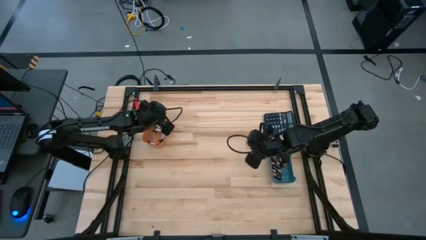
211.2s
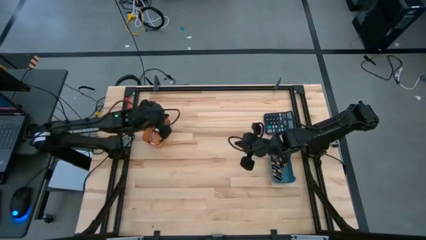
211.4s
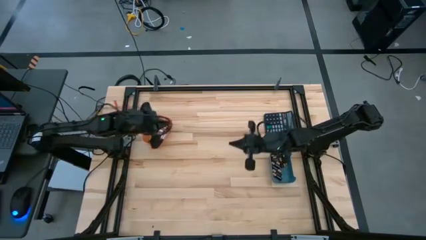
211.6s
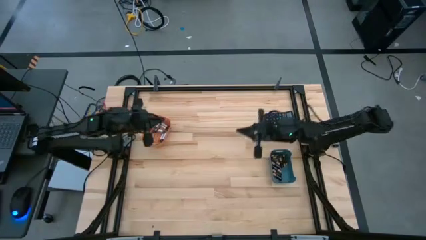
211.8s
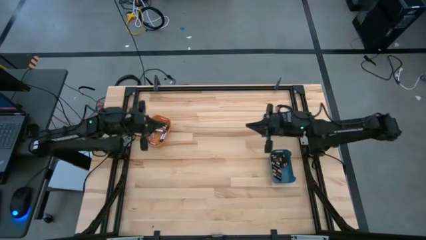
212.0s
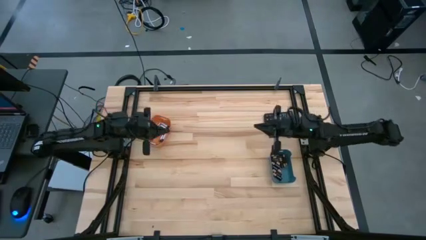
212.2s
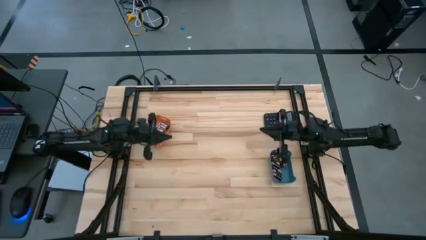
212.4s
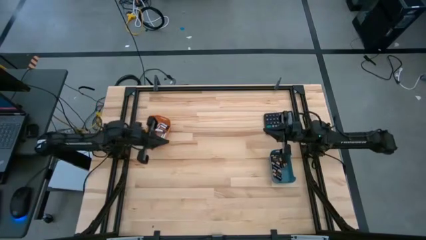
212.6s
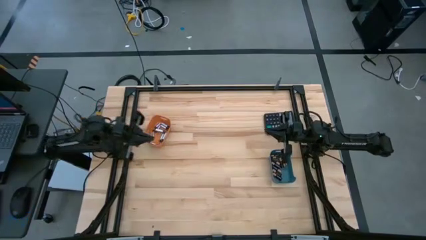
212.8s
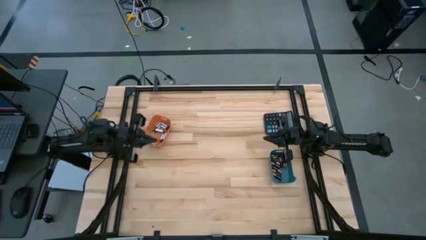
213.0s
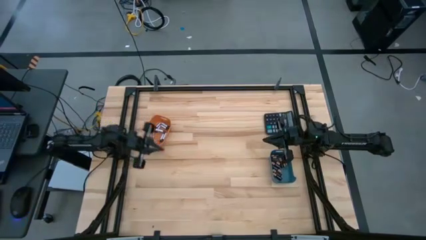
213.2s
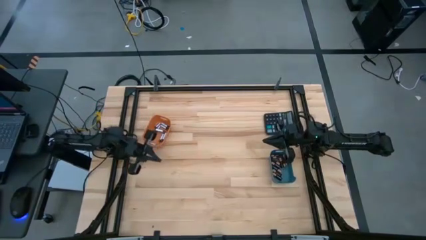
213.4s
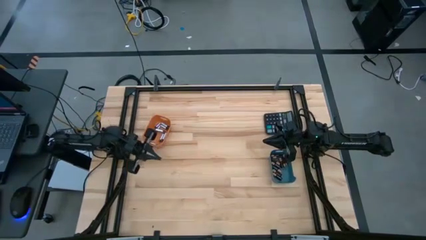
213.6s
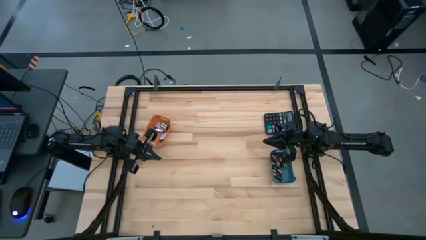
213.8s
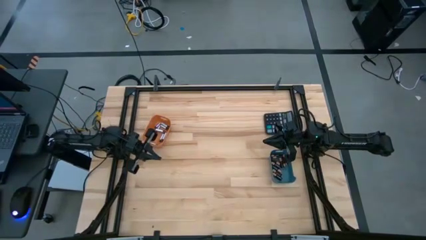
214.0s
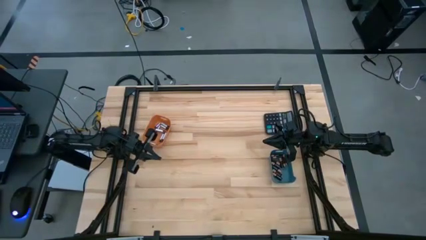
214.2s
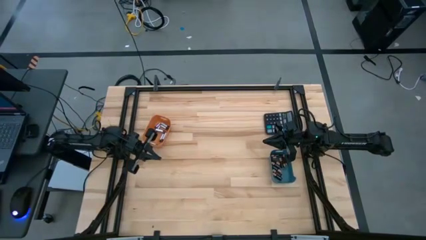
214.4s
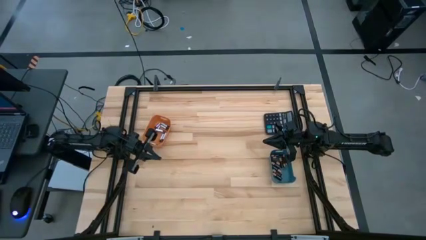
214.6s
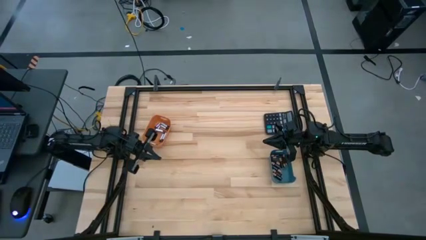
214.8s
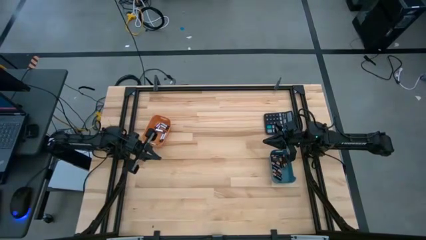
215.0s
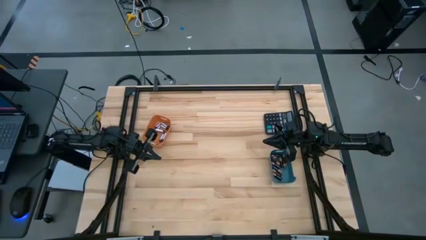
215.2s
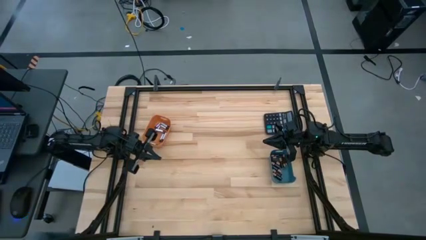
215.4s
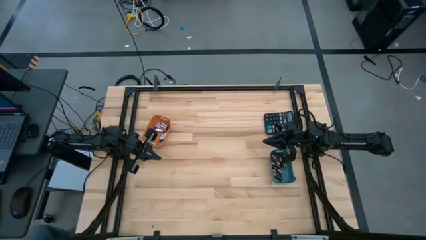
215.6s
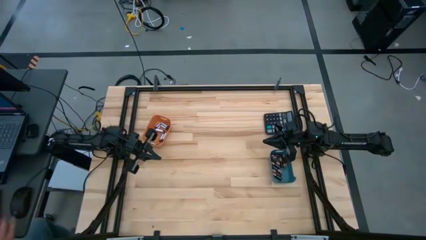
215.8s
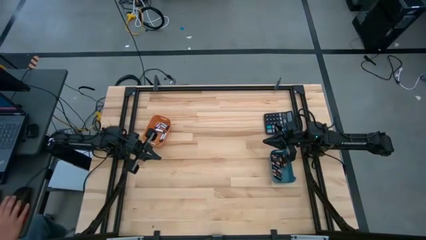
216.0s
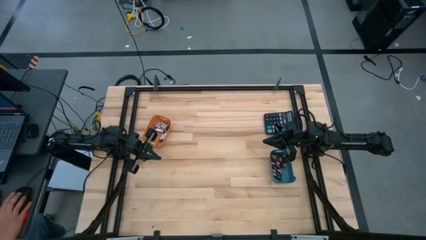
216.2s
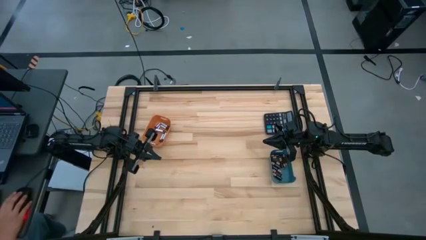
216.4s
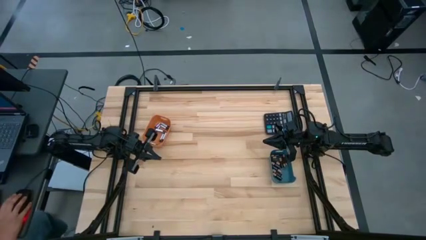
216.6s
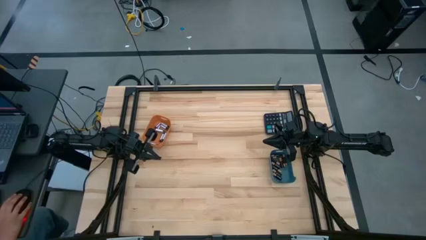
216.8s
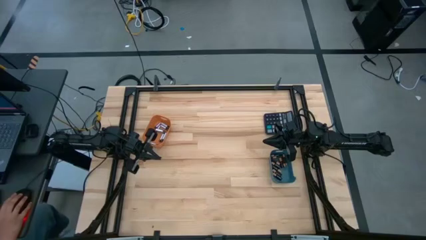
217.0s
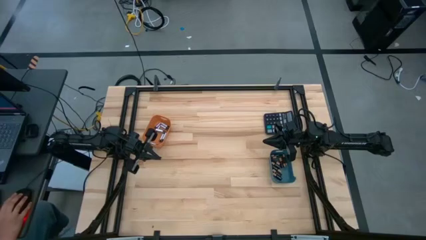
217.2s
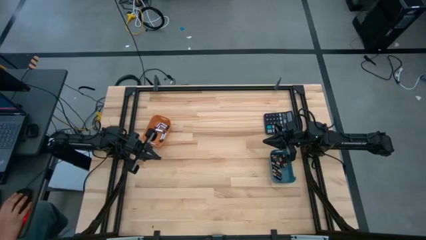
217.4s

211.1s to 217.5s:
Task: Sort batteries
Return to Home Position

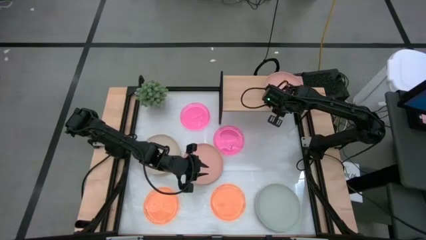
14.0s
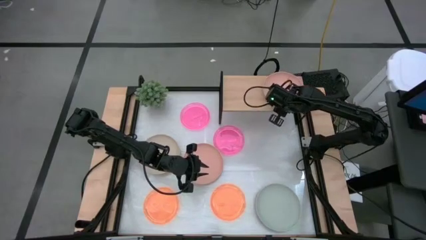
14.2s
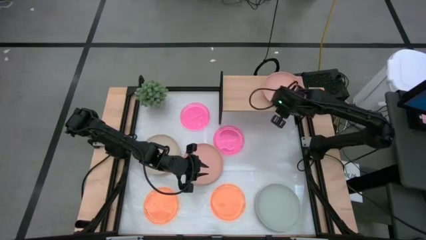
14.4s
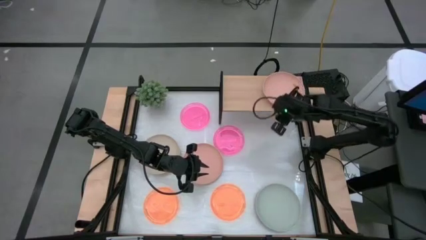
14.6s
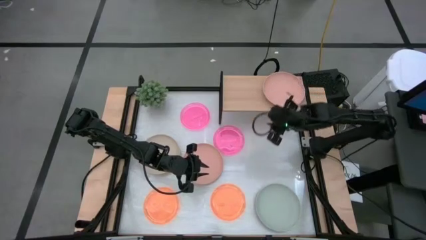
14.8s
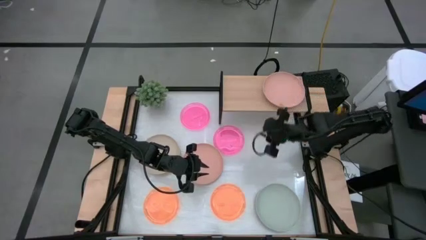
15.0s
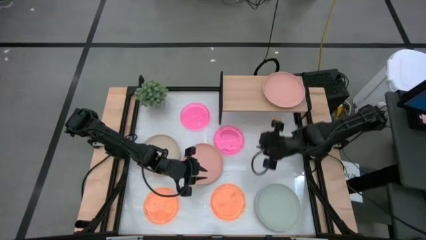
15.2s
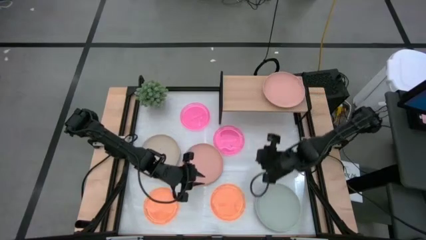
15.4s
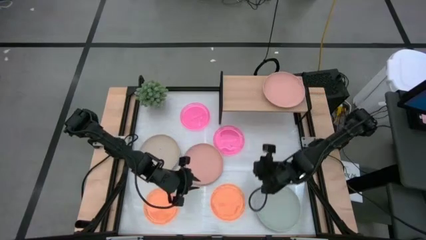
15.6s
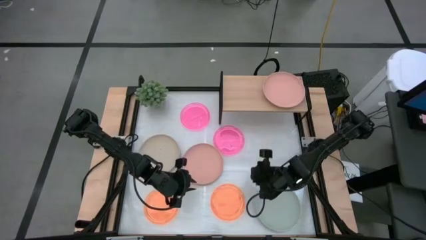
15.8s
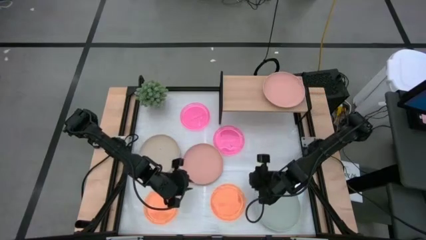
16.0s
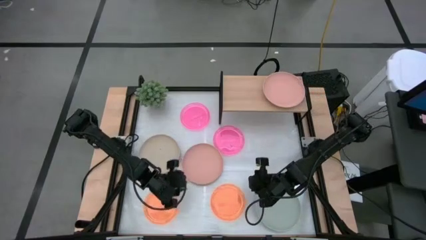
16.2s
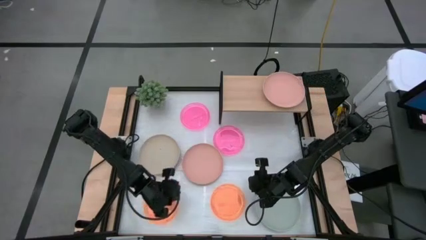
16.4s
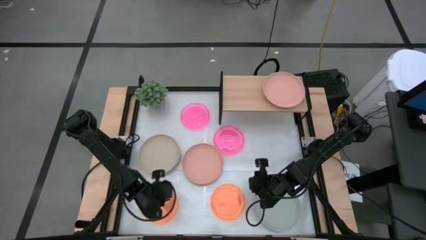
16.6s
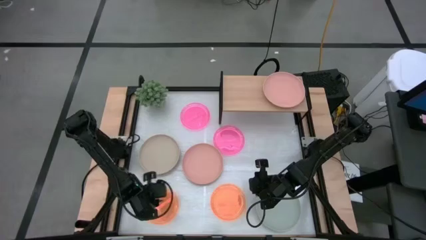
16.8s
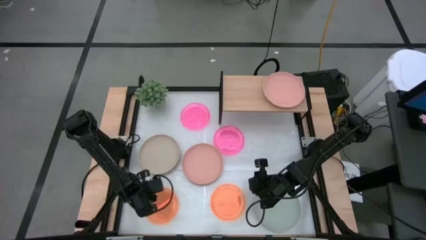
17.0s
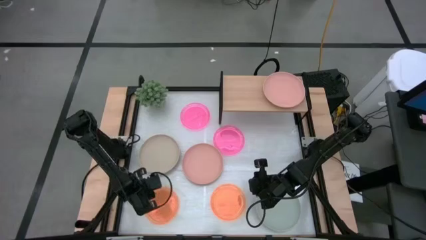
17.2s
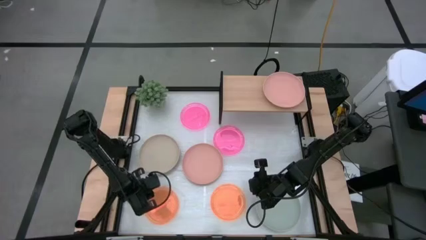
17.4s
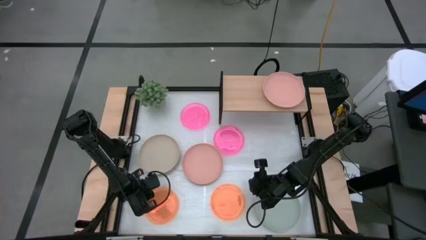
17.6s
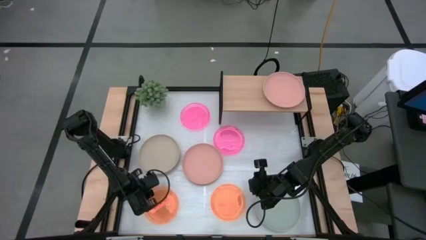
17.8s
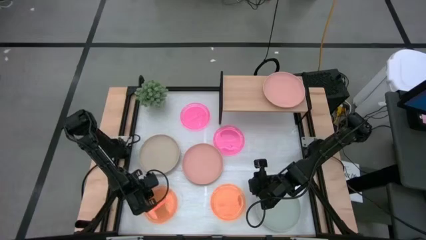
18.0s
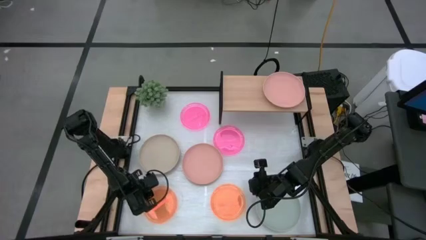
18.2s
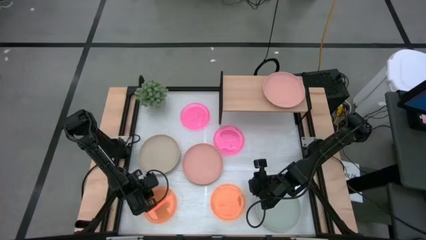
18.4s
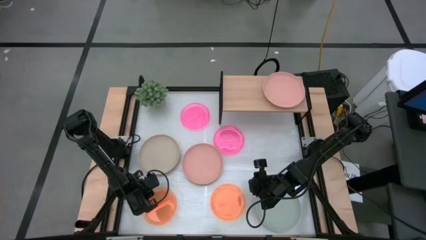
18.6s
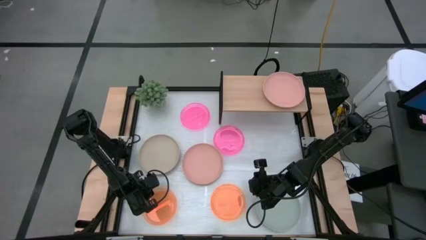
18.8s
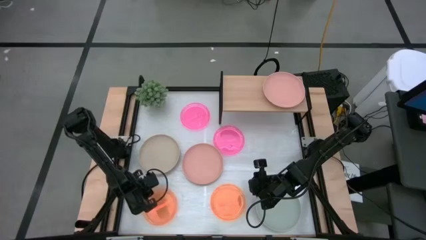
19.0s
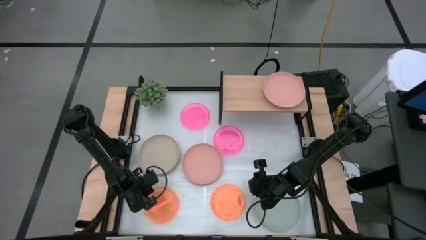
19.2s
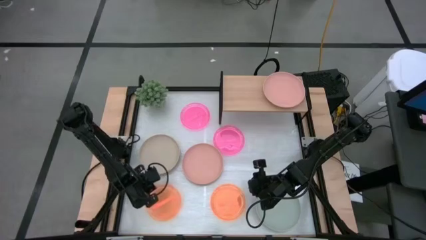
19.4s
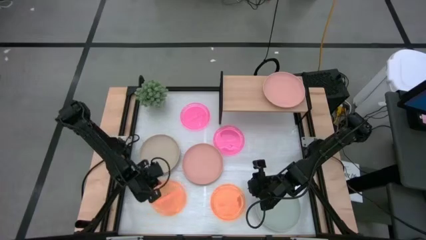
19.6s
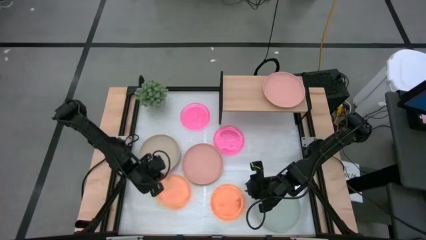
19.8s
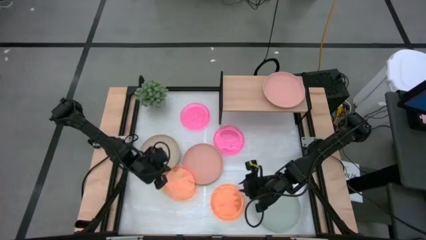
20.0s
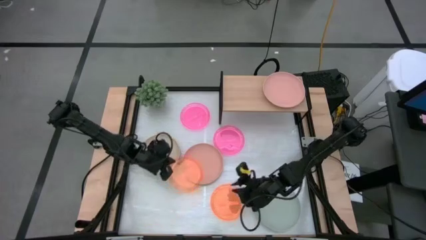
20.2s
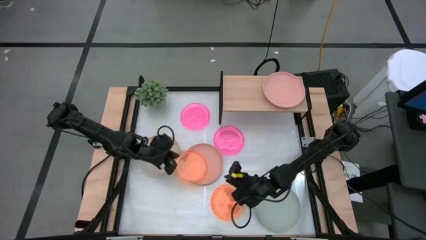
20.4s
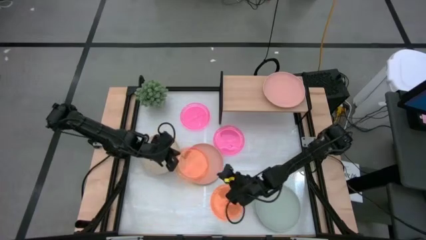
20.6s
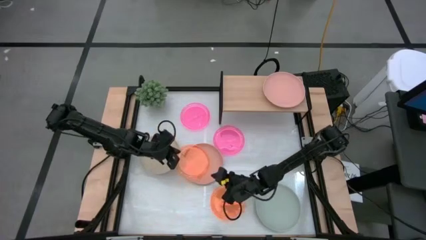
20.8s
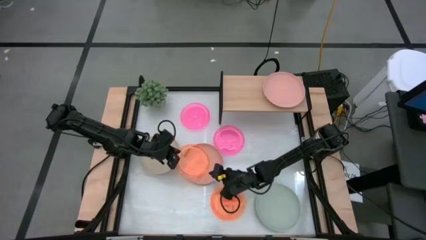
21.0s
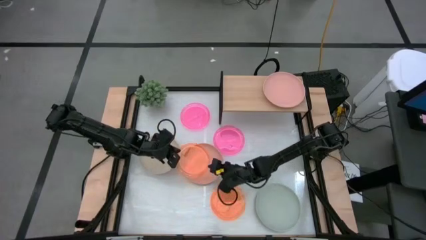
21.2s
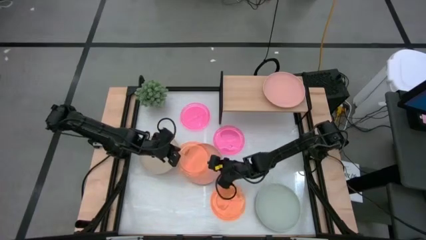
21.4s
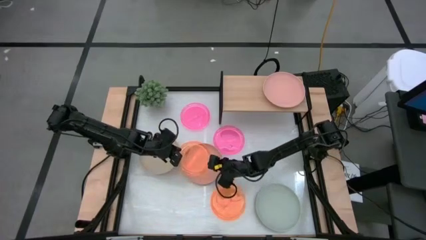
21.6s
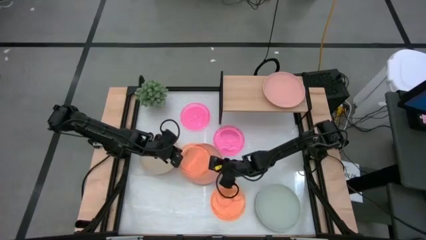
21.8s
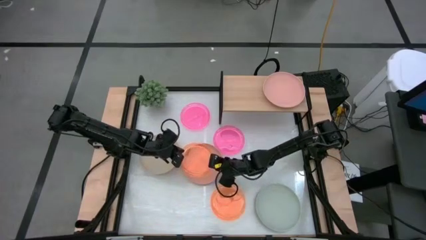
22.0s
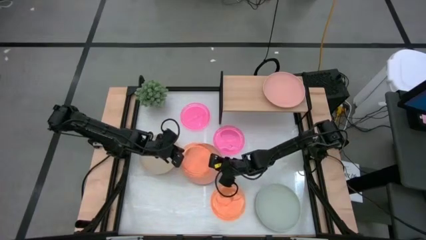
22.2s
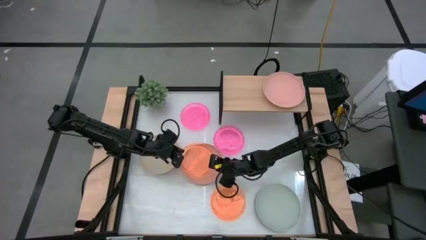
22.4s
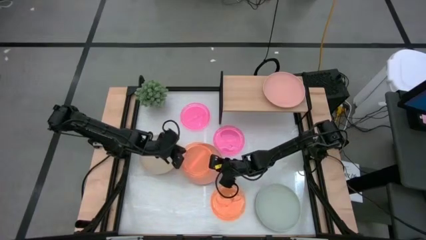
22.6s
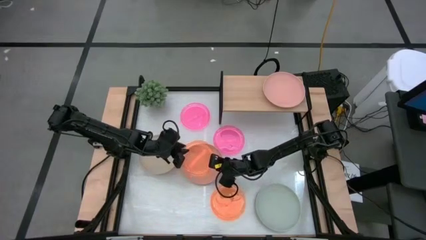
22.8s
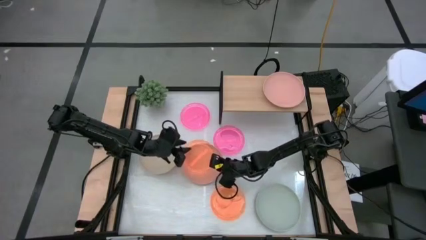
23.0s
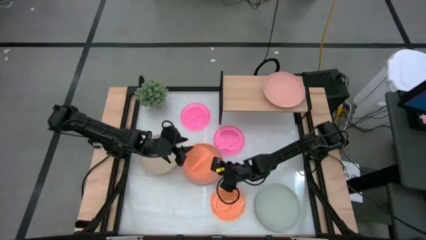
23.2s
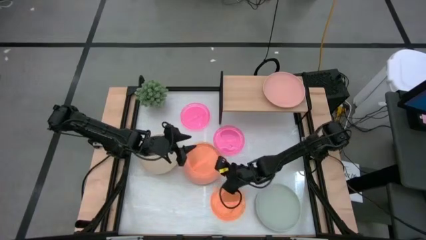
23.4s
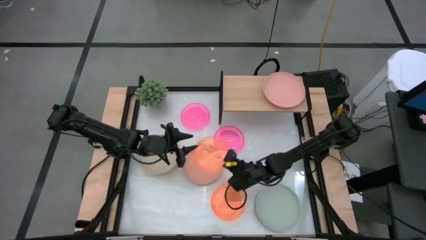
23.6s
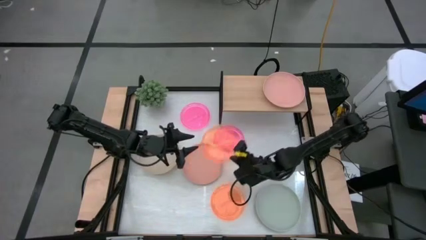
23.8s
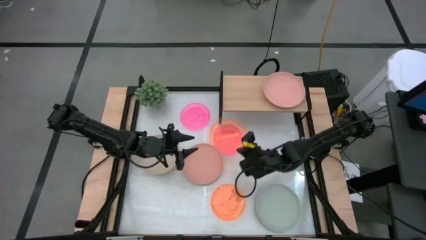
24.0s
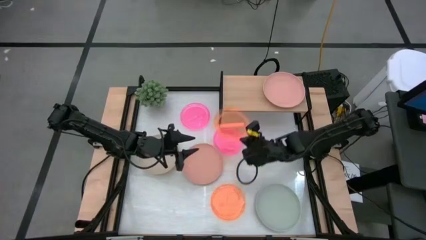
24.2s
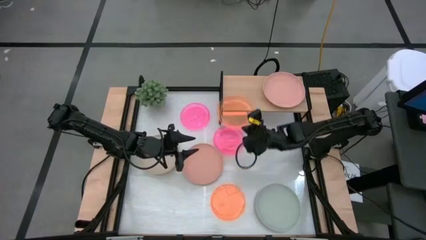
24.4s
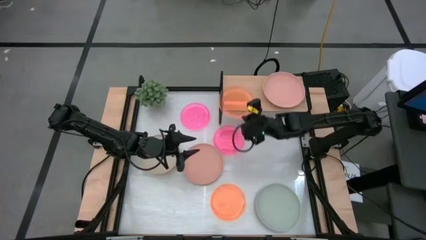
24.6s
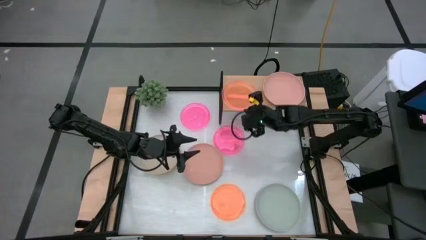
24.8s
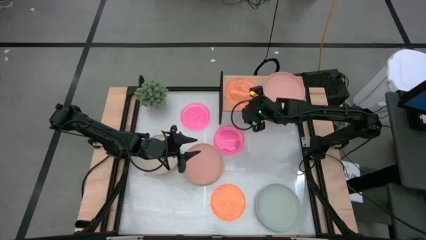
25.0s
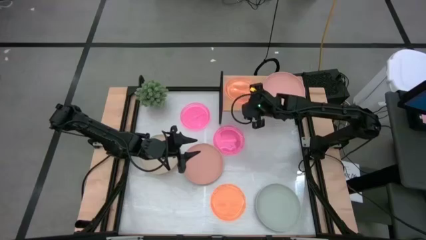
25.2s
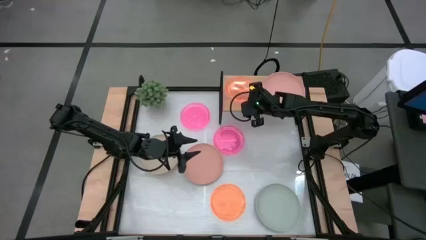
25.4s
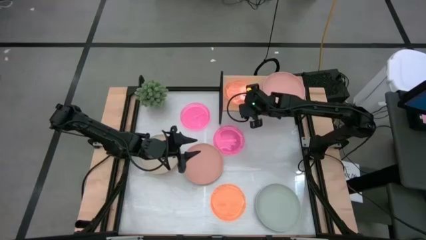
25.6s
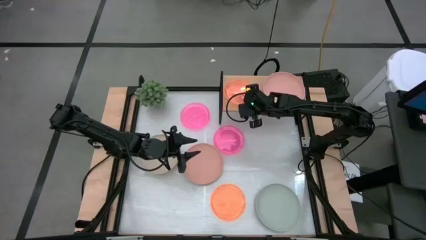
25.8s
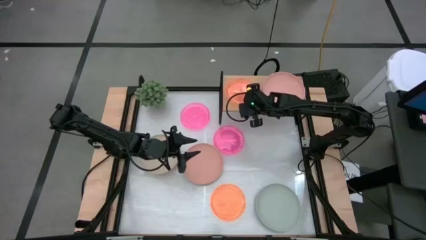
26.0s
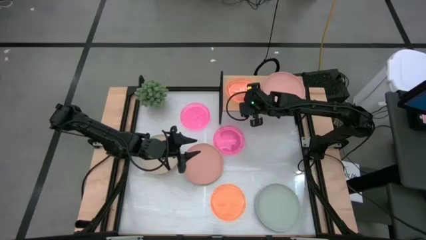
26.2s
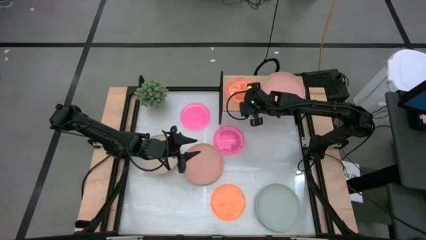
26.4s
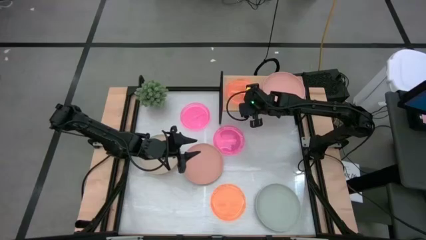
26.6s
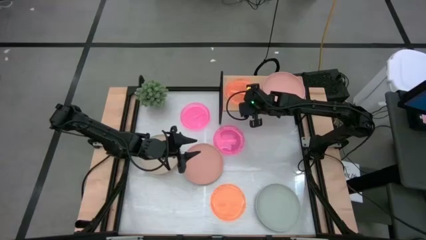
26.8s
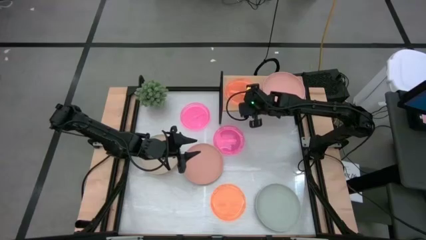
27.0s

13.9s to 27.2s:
Task: Place and stack plates onto a shelf
Put the left orange plate on the shelf
